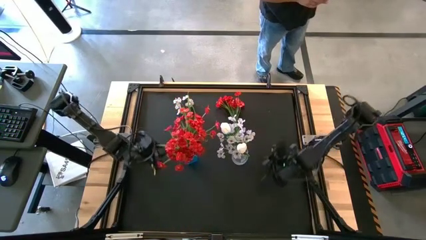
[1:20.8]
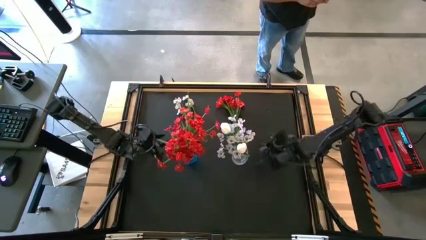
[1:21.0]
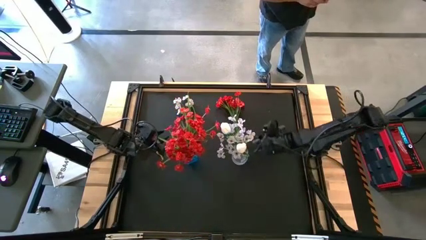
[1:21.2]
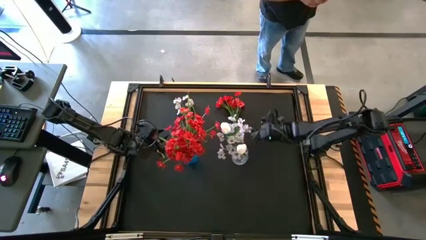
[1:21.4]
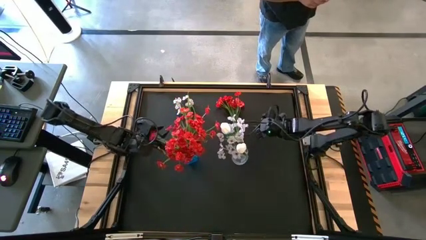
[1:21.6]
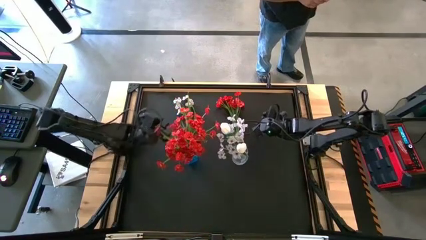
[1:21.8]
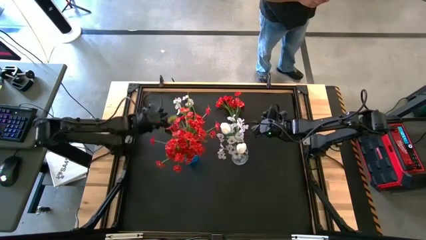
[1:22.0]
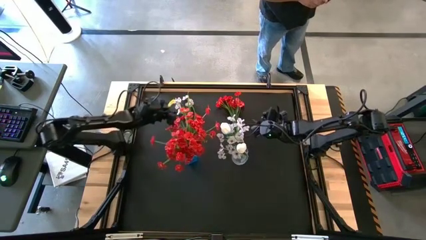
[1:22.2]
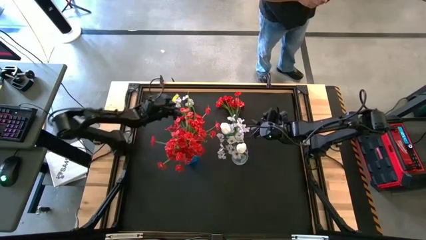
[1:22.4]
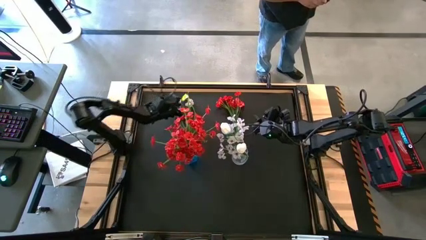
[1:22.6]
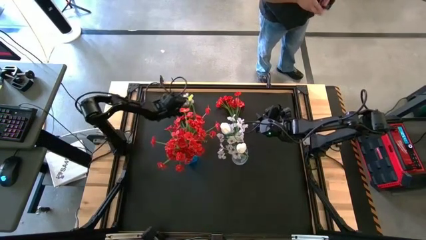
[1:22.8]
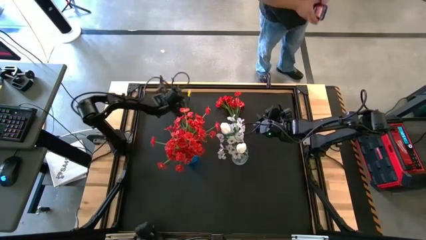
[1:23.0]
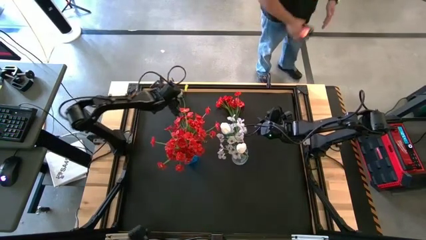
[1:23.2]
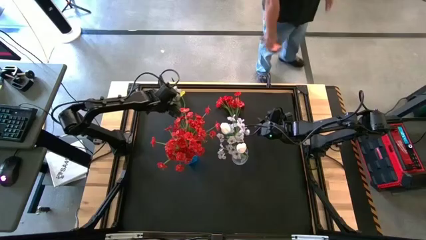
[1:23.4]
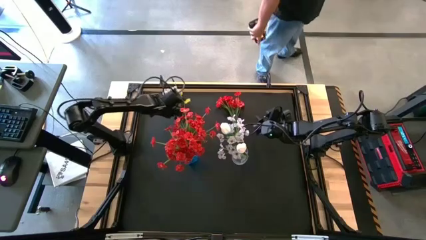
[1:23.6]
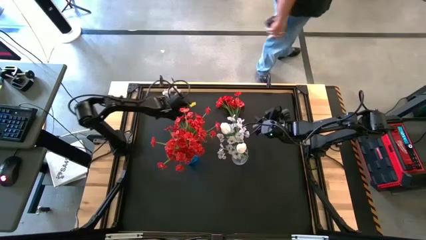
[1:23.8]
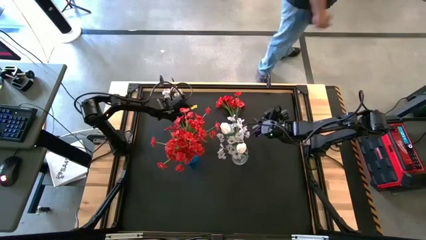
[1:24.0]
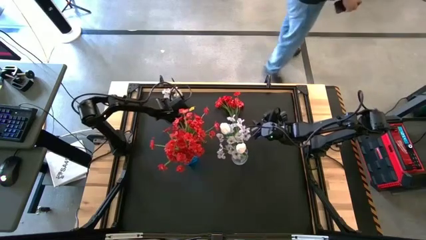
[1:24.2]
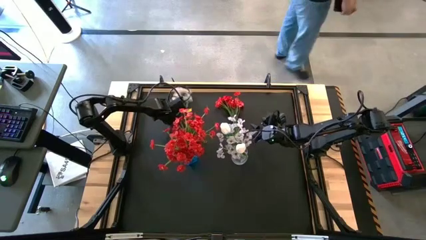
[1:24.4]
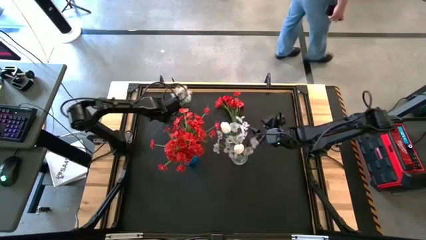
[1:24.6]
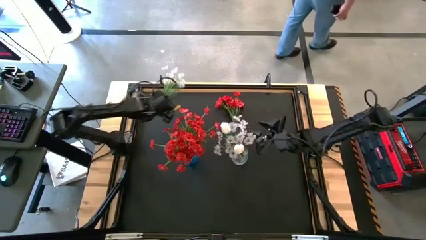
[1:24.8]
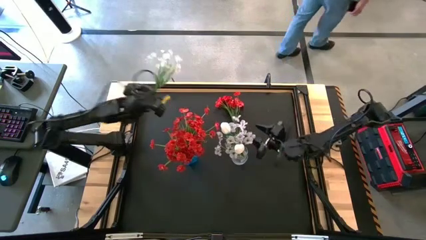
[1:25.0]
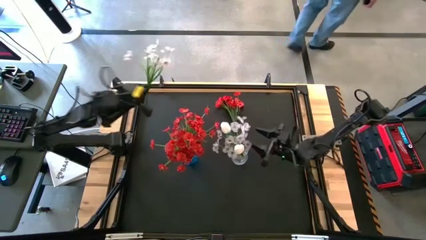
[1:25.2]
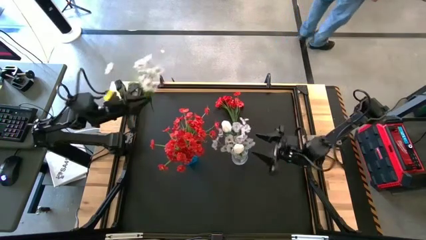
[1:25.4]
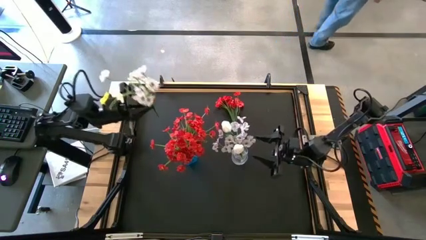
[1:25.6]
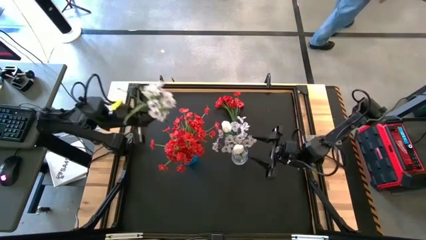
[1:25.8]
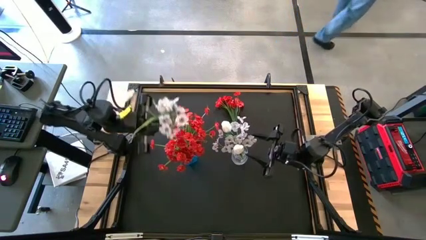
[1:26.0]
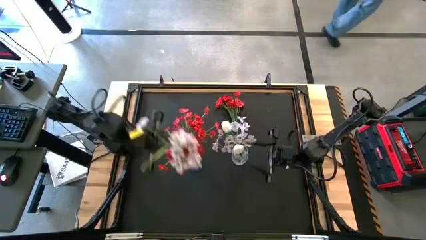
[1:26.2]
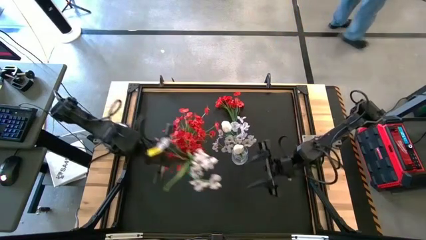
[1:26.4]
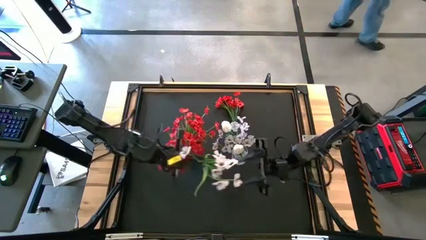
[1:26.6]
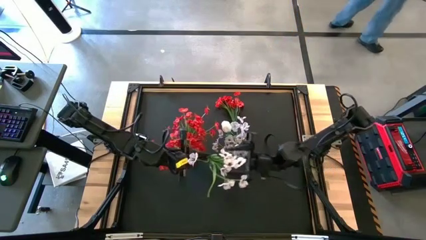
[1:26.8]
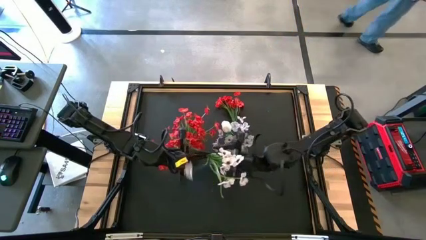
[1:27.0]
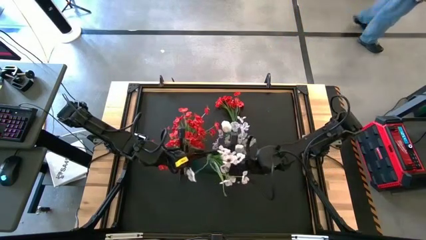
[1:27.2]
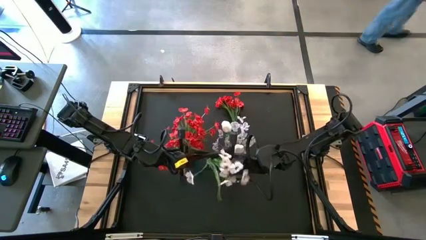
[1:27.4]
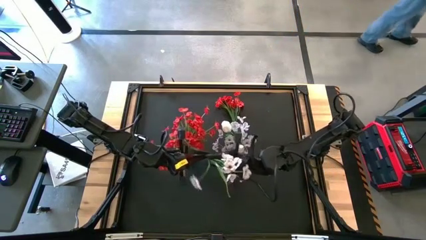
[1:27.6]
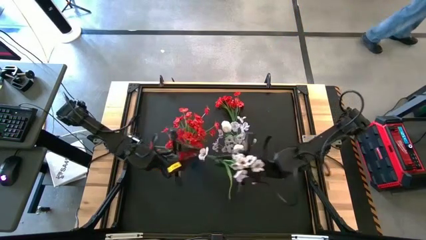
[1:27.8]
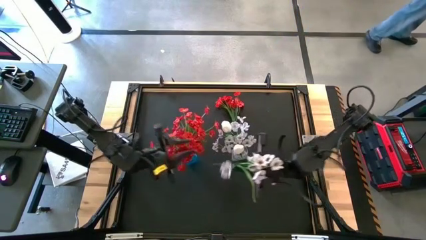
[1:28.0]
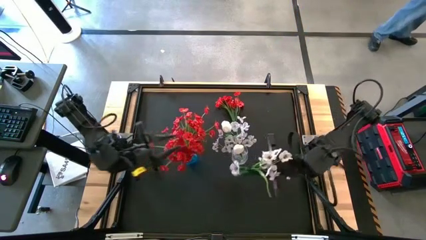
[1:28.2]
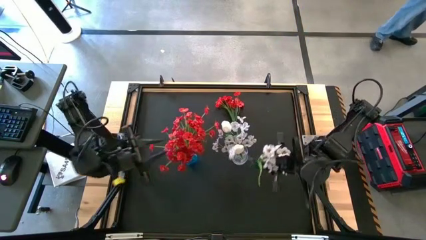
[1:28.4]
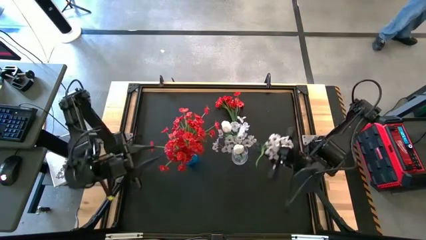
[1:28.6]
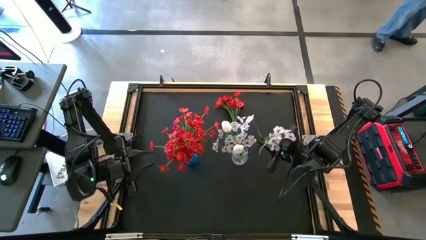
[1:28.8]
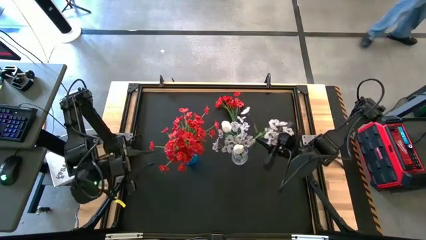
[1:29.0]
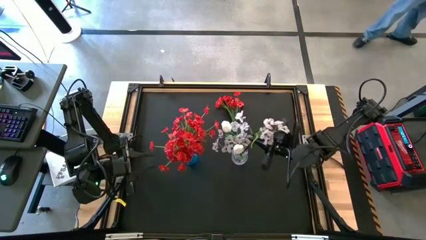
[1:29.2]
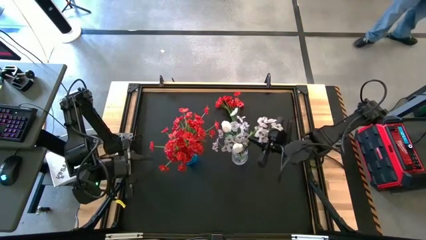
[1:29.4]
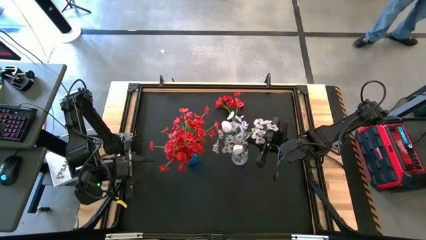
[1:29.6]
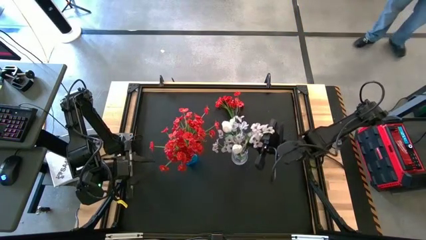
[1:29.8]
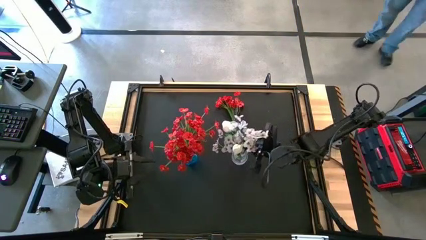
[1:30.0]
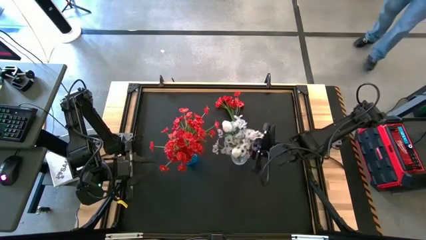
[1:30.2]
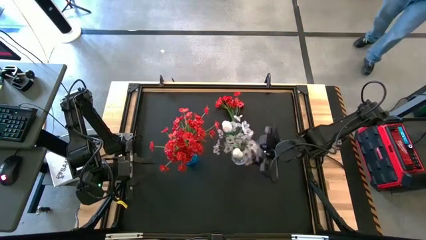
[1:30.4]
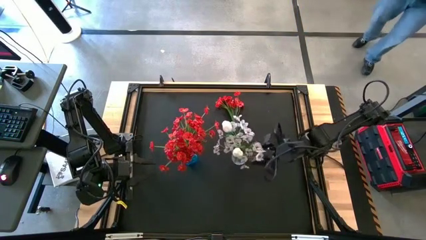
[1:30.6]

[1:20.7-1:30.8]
Task: Sort flowers into vase by color
Put the white flowers into the transparent vase

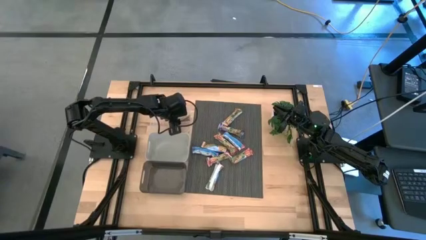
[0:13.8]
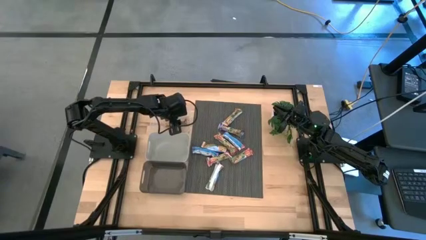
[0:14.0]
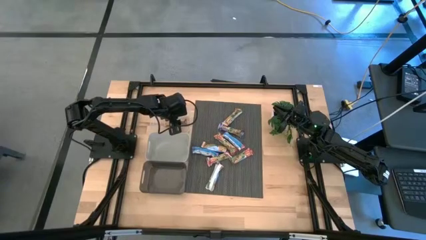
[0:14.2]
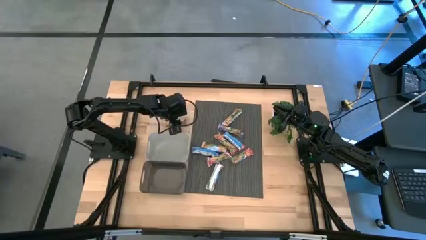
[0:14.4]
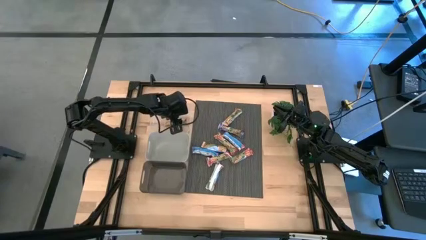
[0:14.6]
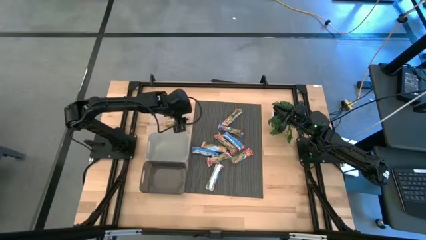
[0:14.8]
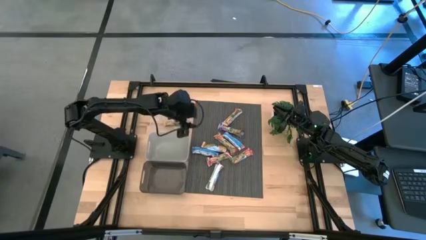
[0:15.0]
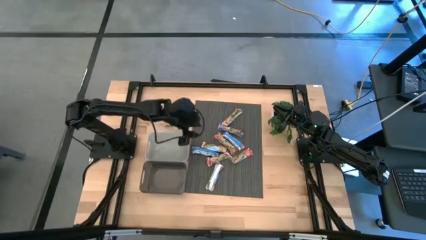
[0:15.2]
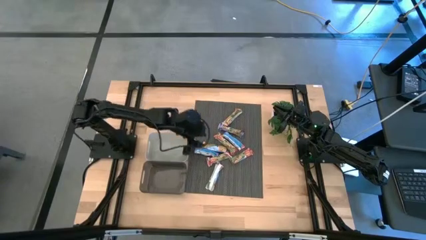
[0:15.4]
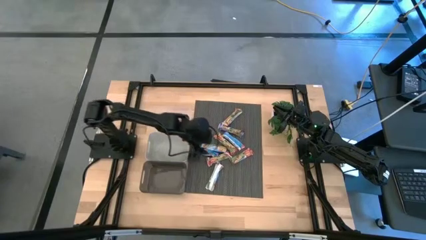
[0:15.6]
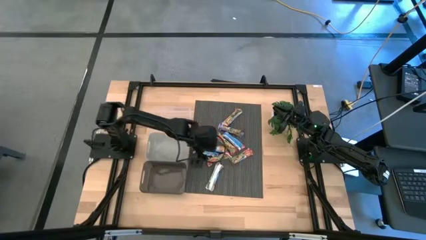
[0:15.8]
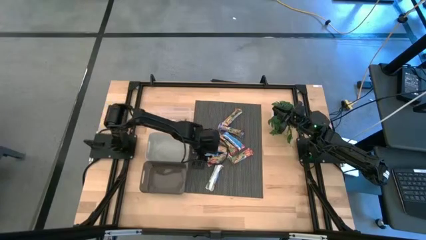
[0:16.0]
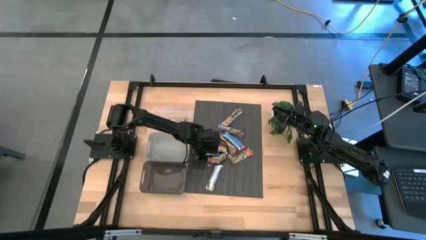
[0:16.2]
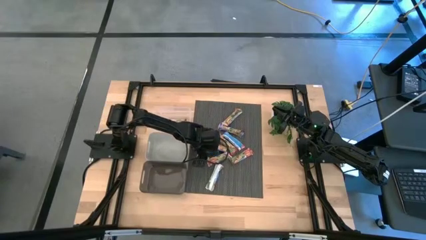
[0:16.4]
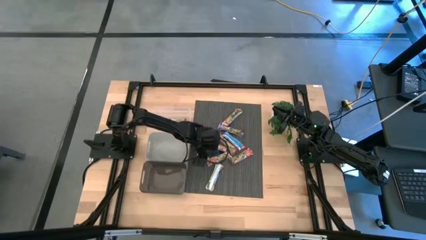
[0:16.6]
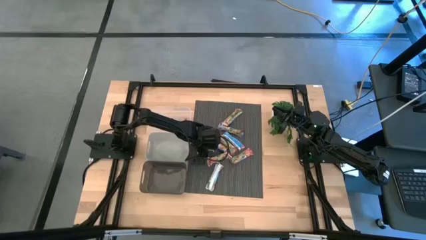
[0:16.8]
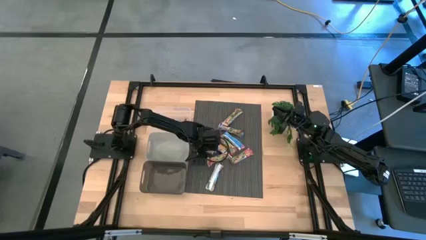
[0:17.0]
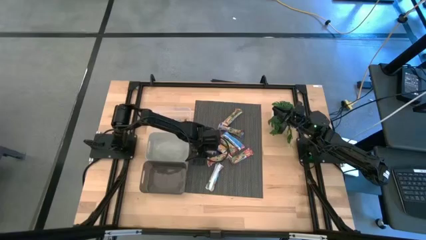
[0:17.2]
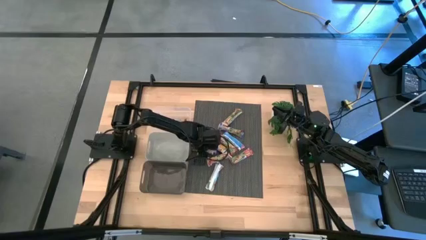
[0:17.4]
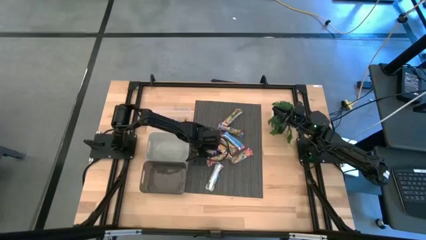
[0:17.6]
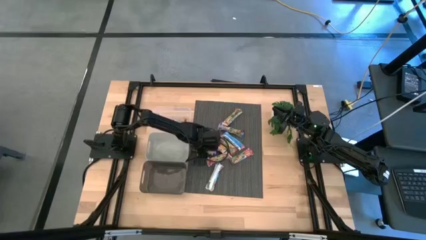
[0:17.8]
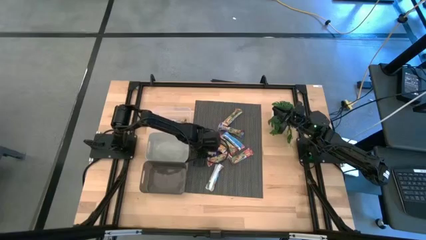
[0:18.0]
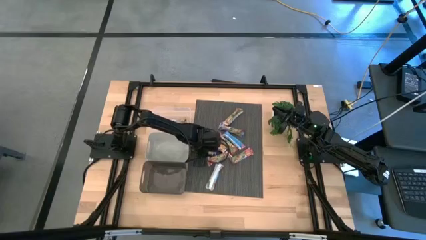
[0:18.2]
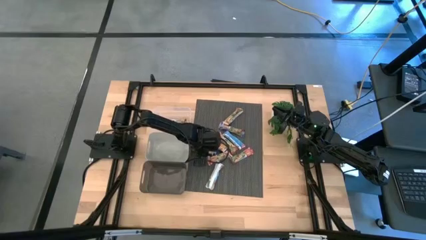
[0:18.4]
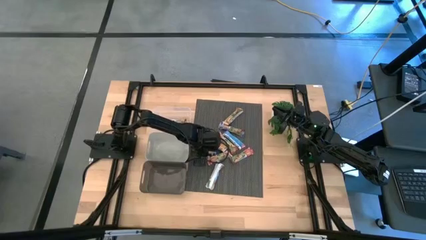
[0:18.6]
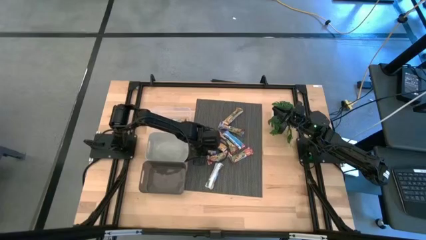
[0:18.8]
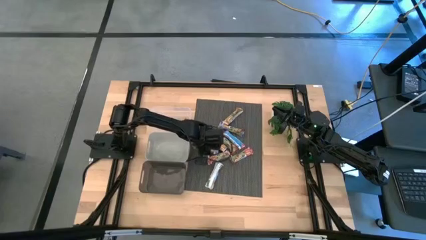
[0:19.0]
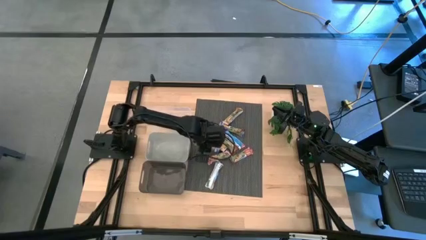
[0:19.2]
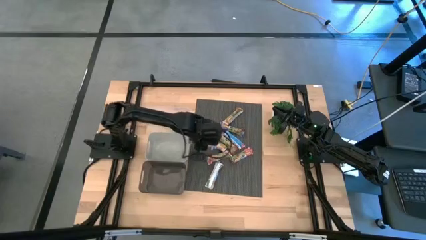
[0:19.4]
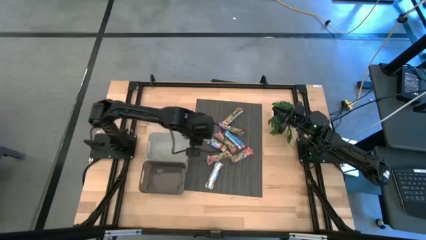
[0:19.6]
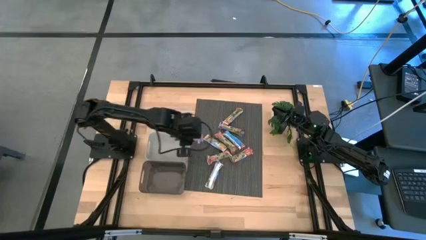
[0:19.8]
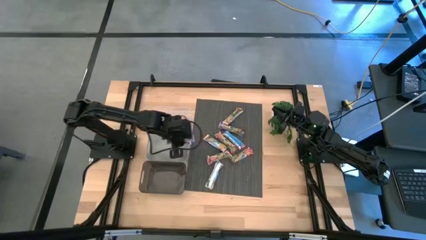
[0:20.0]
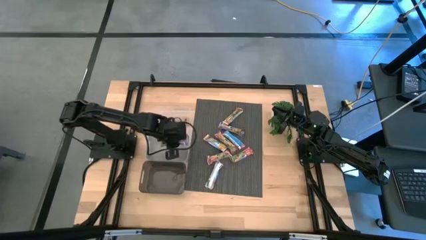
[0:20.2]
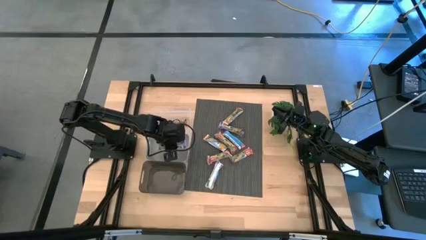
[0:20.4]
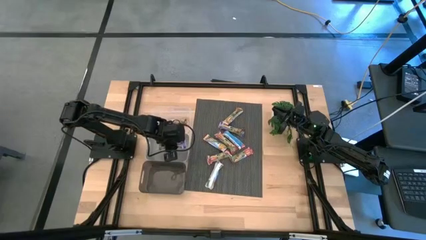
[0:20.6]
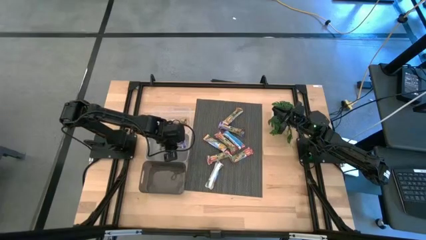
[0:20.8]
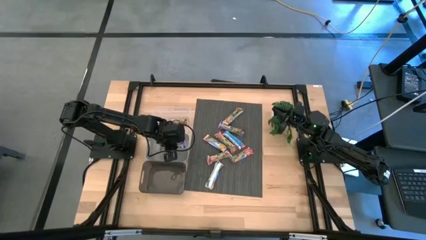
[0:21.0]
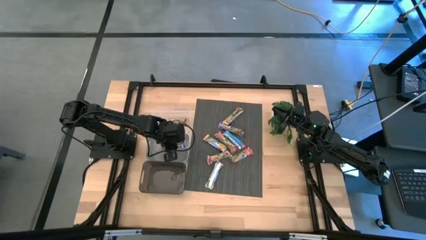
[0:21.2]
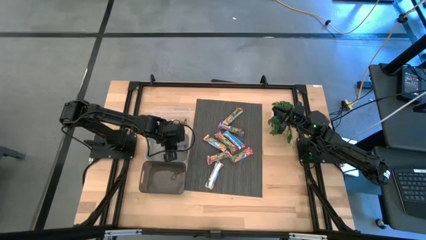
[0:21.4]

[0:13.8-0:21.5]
Task: Pick and place Granola Bars by type
Put the blue granola bar into the gray bin
